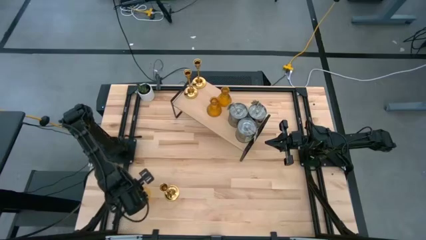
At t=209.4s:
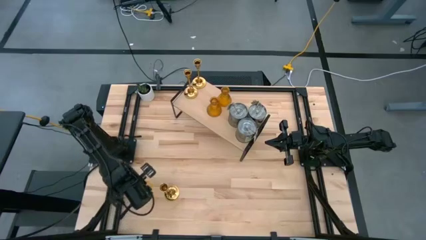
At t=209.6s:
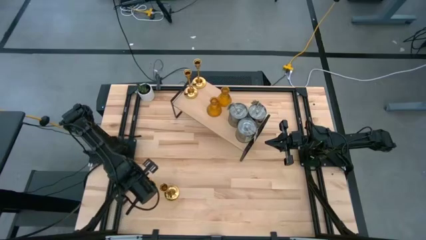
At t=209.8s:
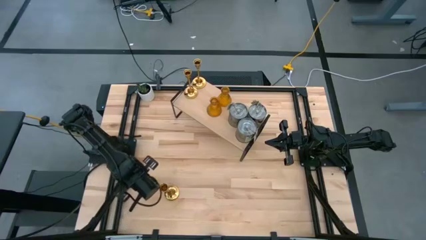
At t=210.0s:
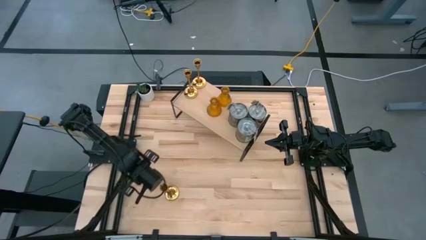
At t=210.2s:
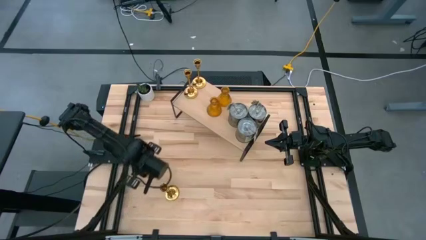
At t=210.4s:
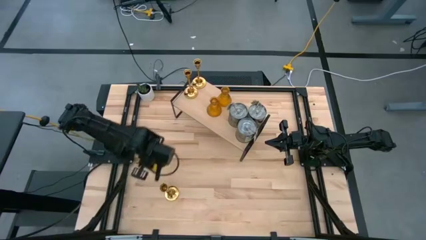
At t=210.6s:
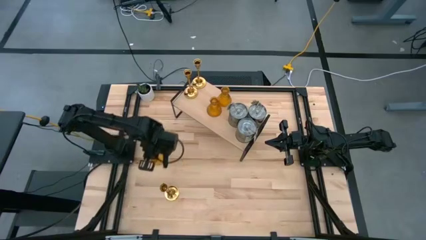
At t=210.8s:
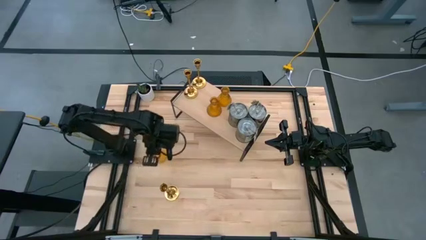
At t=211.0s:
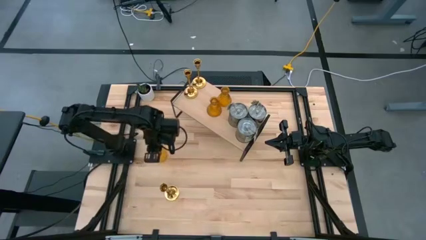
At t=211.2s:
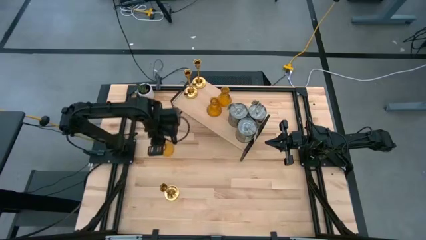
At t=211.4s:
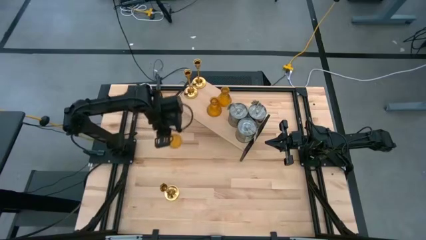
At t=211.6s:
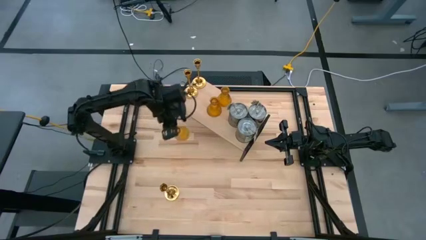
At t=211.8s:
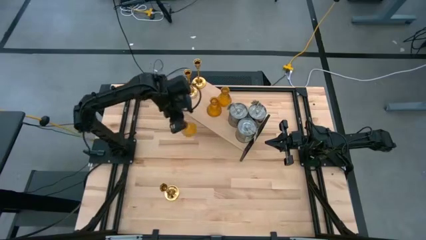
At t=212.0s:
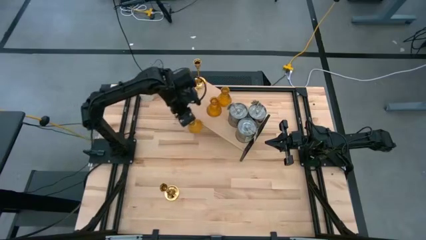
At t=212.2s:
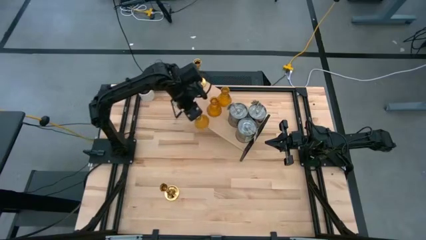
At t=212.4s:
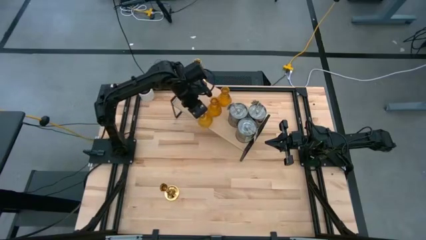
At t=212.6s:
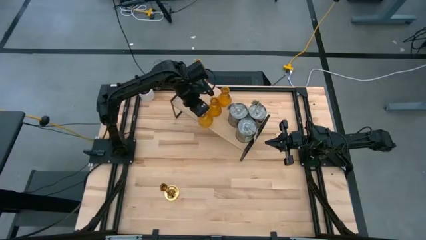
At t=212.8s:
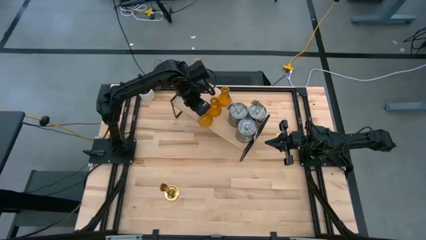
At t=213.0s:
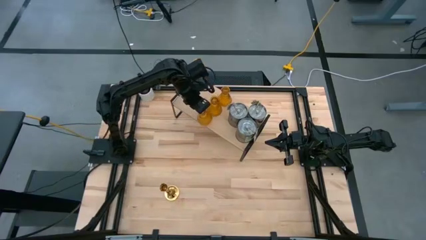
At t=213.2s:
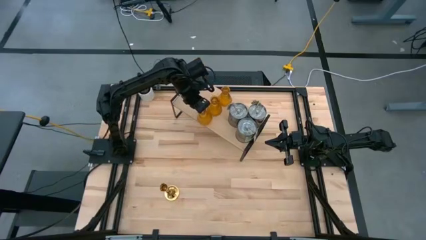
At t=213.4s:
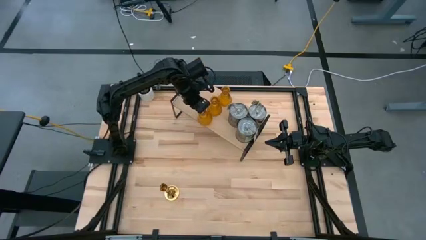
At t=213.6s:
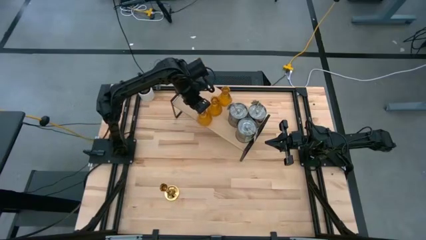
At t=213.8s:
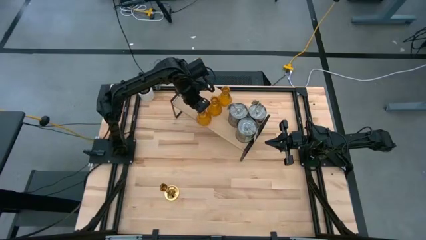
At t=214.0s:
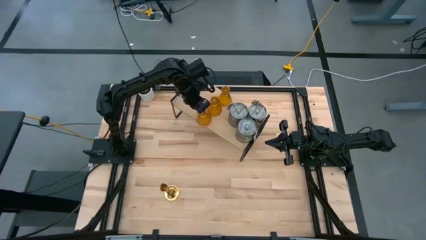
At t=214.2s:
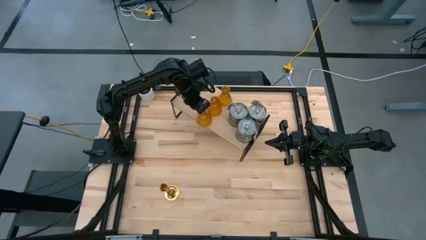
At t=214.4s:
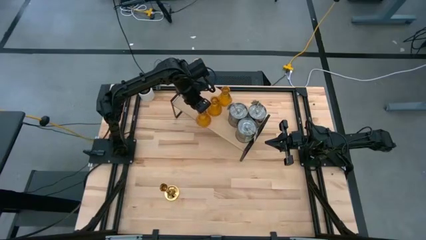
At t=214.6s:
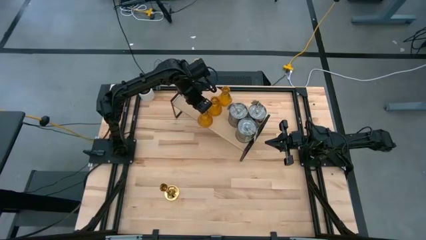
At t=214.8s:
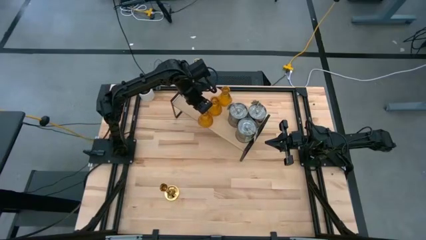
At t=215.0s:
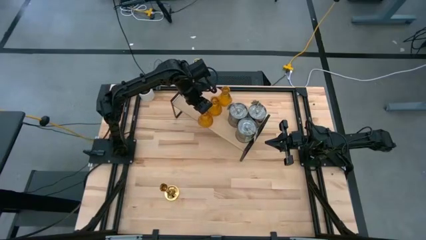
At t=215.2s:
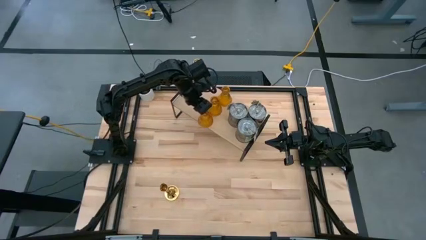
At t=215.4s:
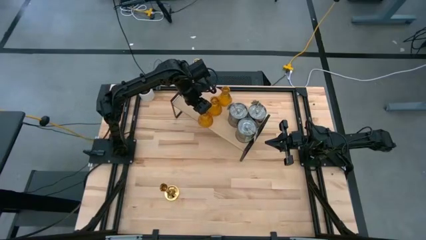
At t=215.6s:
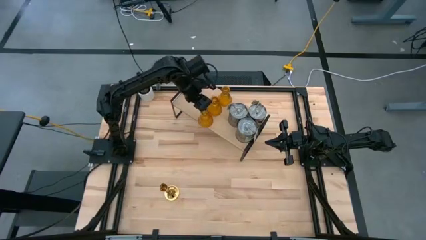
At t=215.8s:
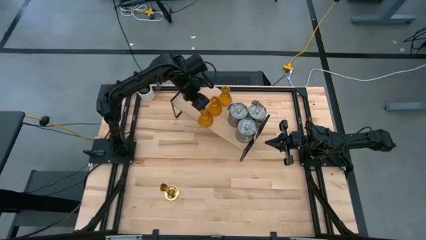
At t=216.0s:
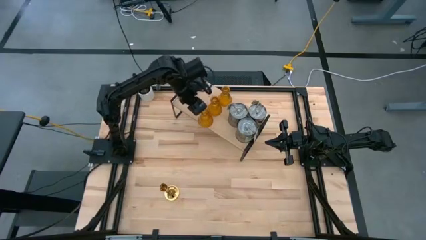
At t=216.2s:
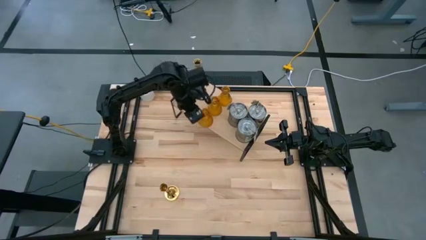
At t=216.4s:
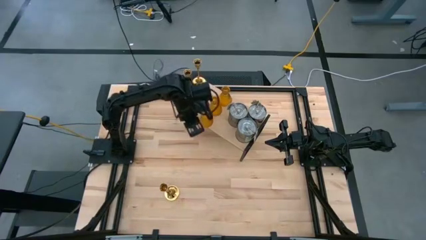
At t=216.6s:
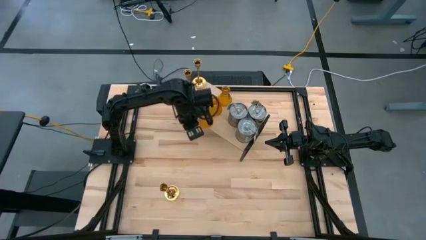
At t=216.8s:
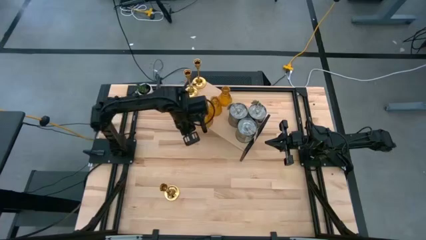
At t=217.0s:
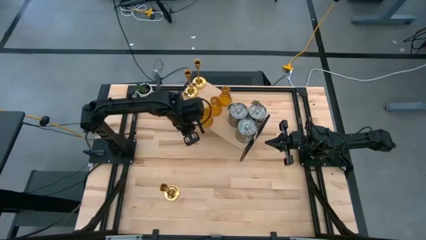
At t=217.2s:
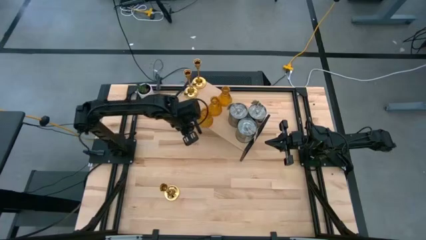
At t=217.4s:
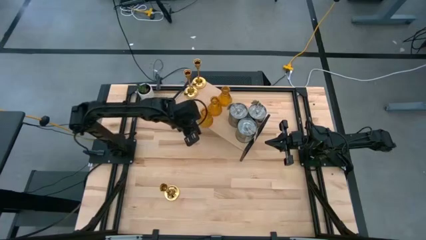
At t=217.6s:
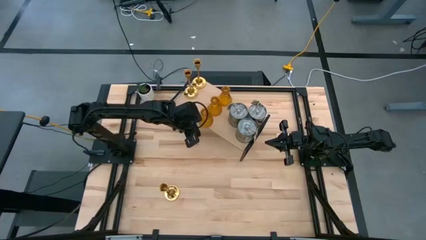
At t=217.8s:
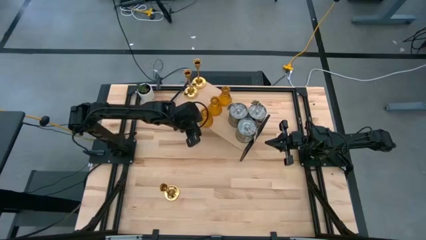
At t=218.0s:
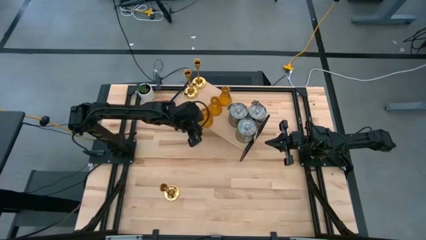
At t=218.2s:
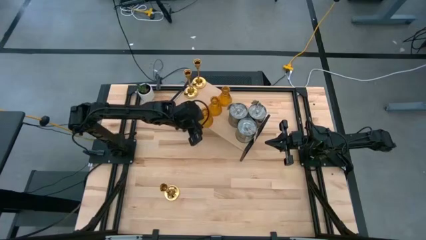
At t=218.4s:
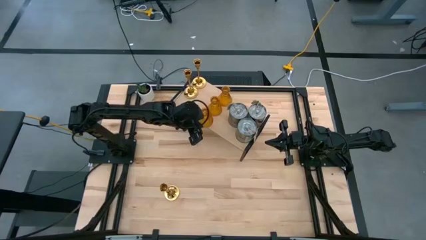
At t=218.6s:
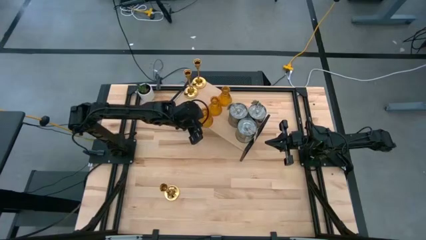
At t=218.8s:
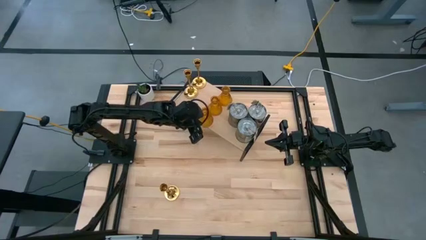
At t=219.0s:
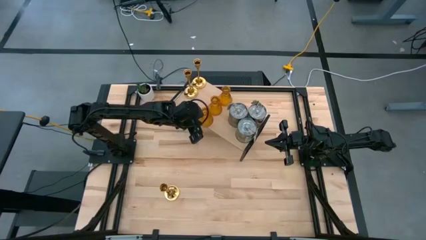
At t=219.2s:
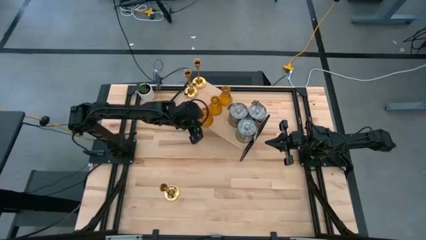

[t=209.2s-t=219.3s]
Task: Pick & Place candle stick holders
Put the yellow candle holder on the shelf aligned with the other yellow candle holders

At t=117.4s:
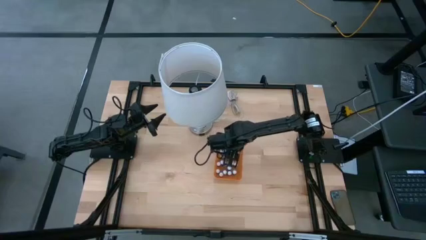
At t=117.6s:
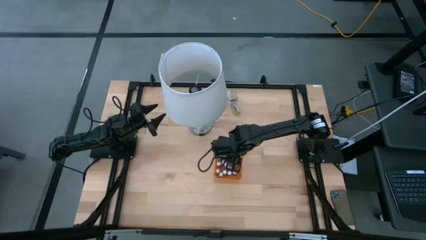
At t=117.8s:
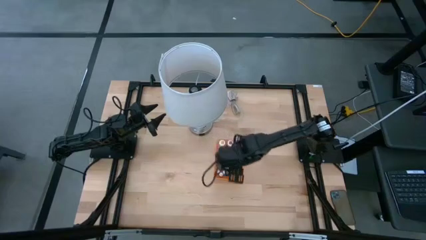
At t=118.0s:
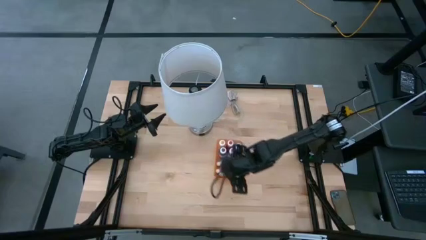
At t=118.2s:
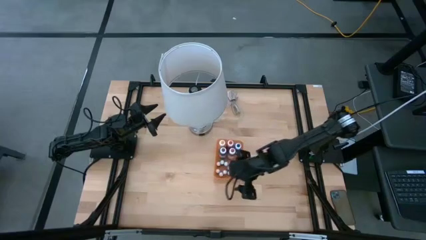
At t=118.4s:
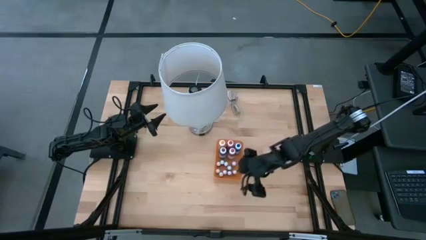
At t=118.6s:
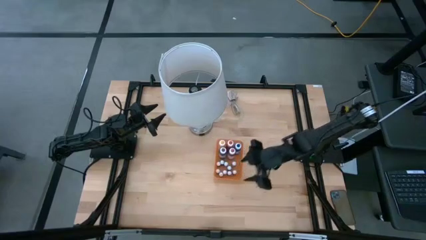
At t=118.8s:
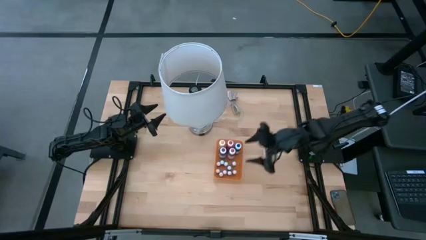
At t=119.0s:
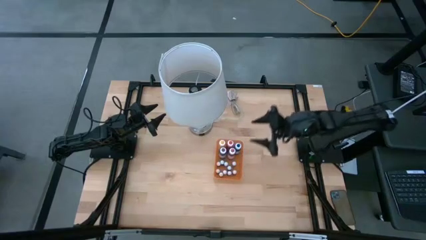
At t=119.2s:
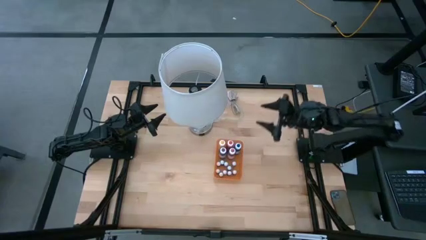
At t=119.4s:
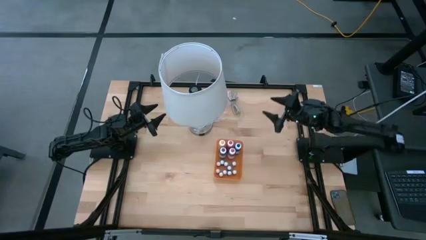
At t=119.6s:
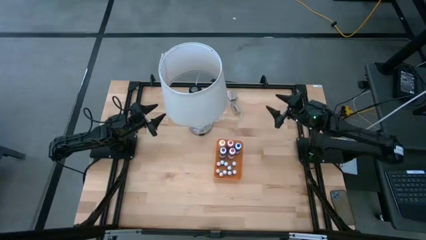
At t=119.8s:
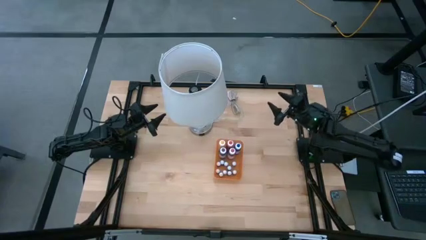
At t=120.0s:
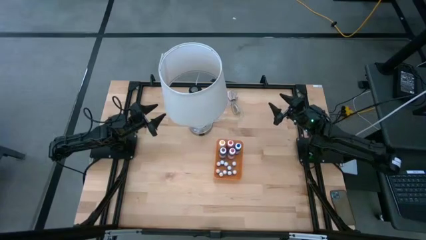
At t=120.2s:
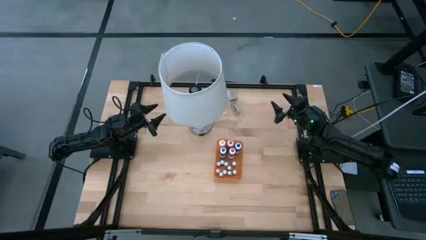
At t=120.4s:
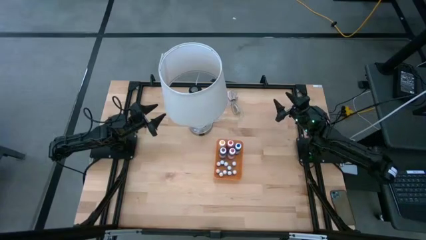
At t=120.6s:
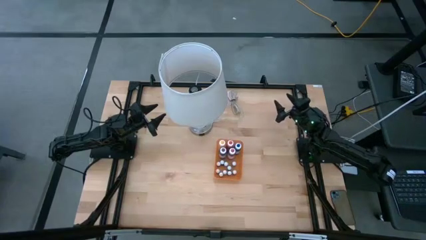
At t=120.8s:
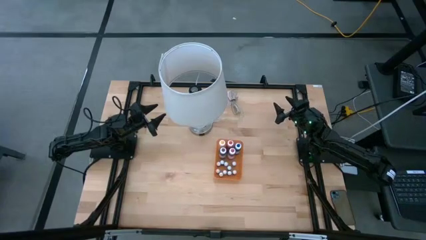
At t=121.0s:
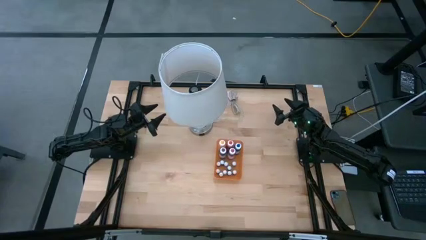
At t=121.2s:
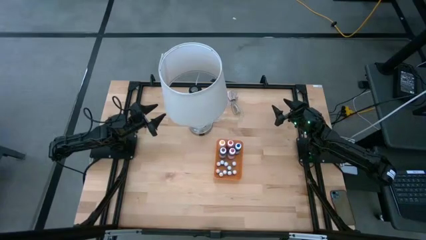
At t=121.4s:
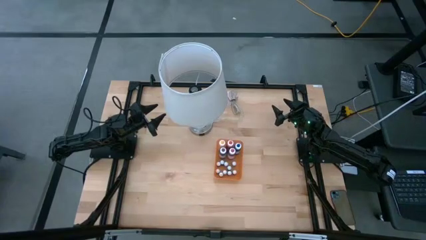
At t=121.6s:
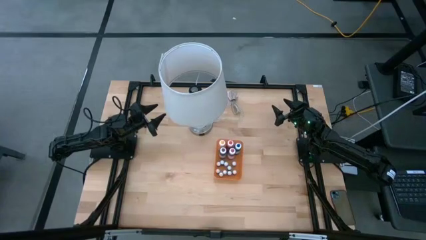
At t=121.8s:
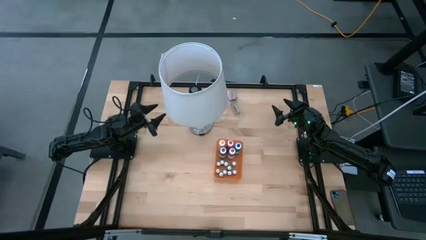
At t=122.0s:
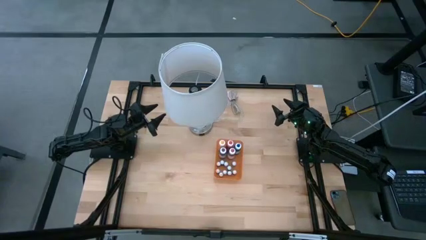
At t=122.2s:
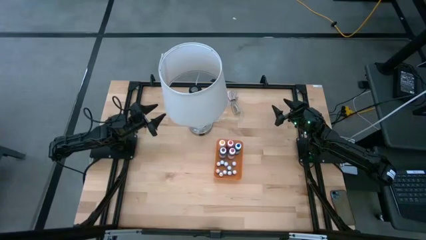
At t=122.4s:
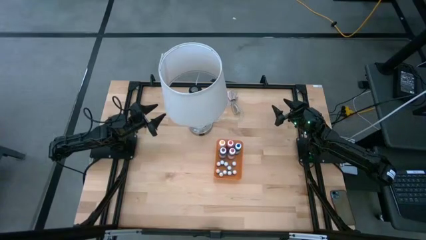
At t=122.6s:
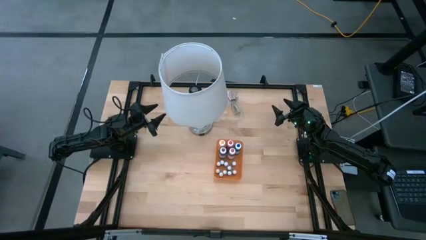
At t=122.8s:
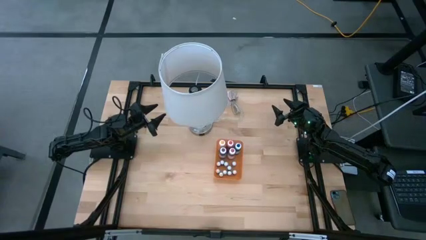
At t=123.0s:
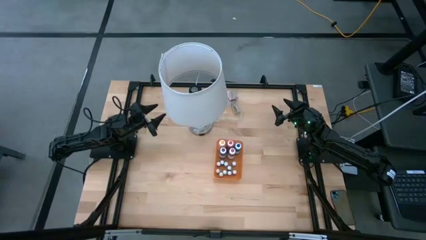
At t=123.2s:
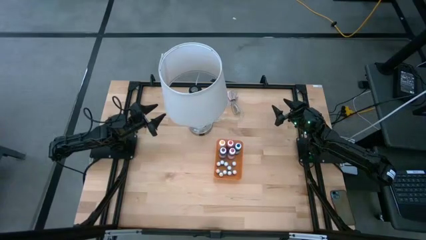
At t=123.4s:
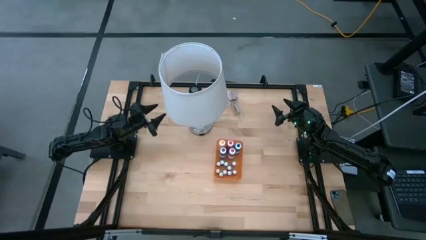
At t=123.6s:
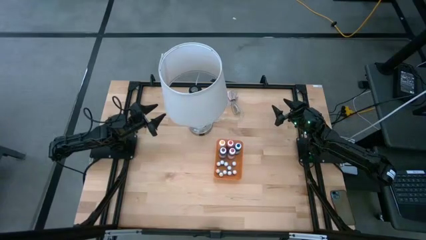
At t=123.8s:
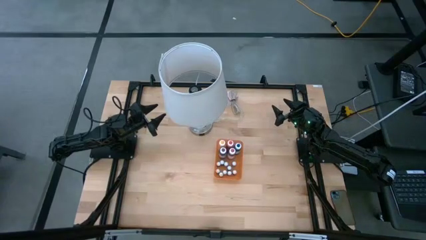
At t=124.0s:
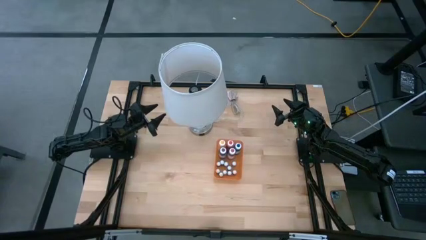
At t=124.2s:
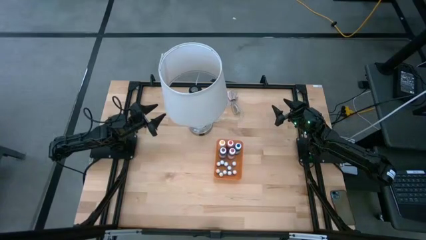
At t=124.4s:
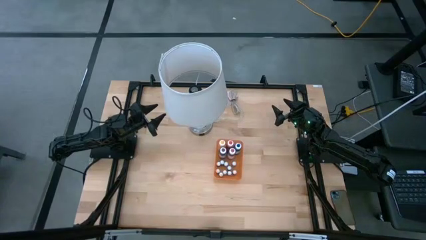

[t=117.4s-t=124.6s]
Task: Pick & Place food coloring
Return to Home Position
